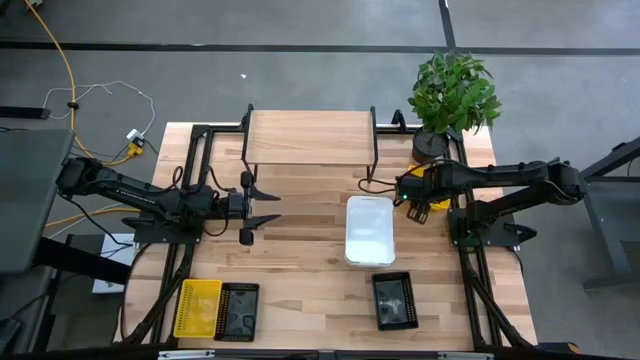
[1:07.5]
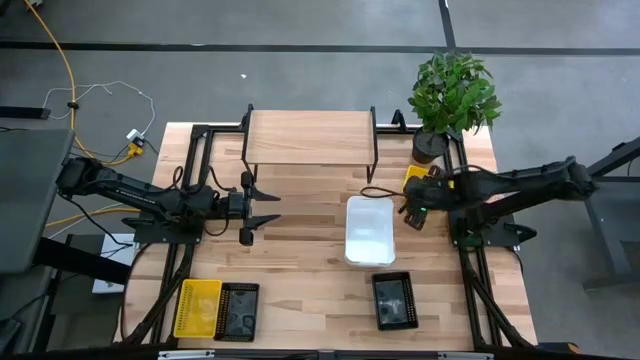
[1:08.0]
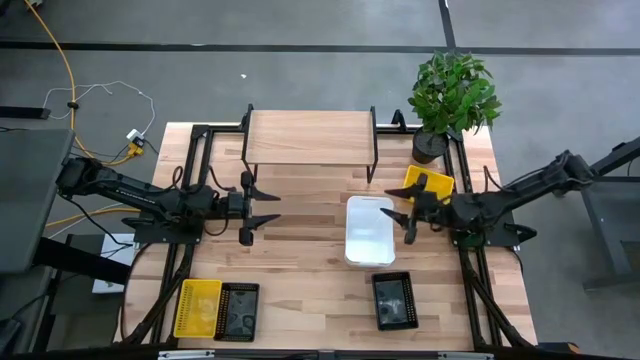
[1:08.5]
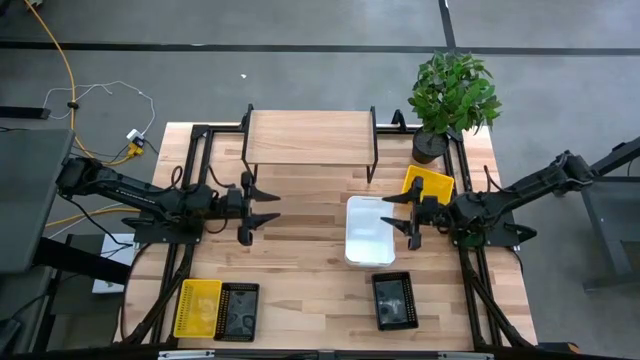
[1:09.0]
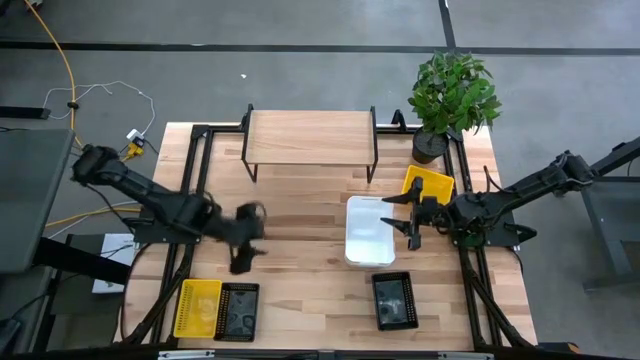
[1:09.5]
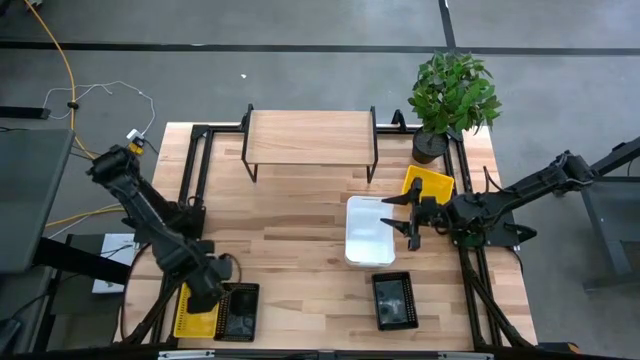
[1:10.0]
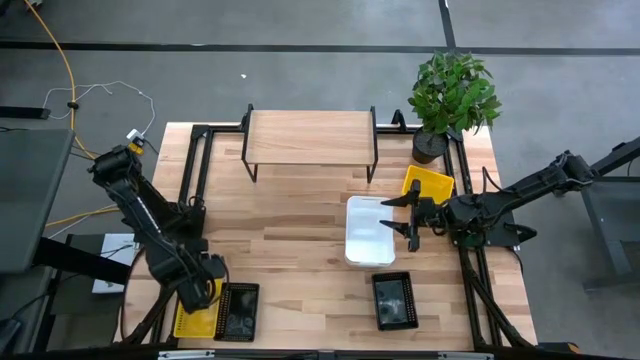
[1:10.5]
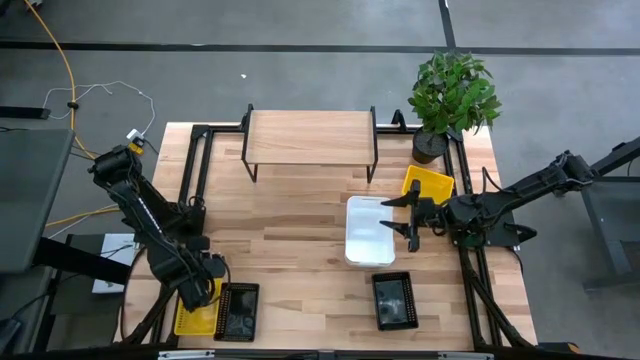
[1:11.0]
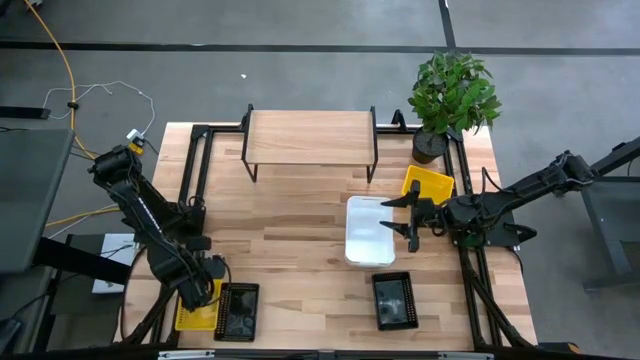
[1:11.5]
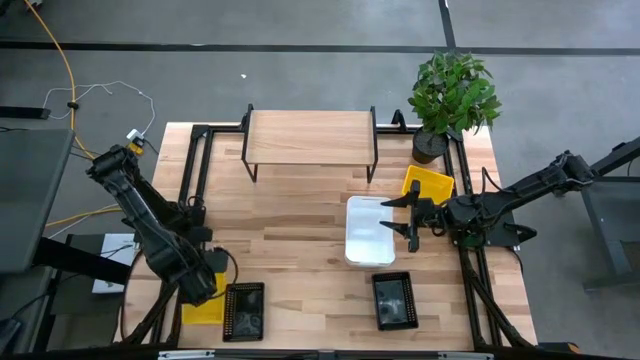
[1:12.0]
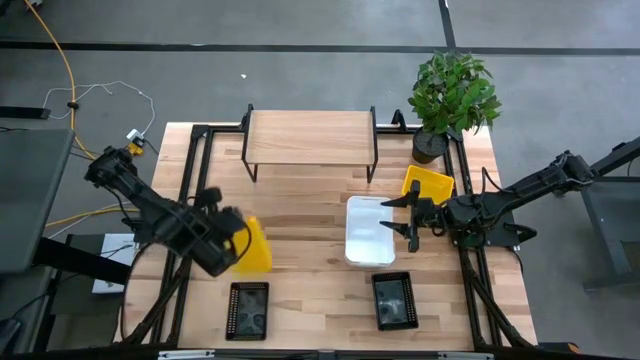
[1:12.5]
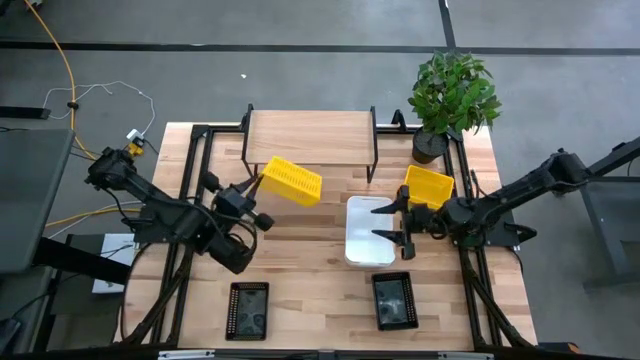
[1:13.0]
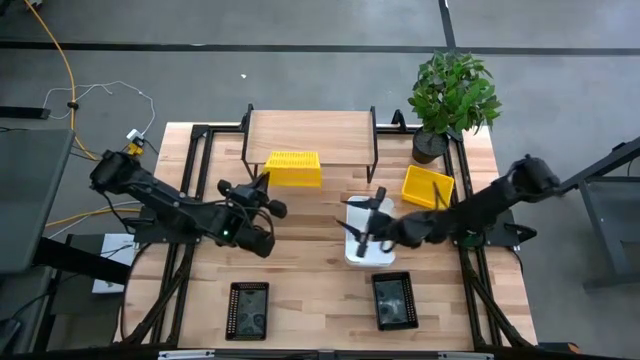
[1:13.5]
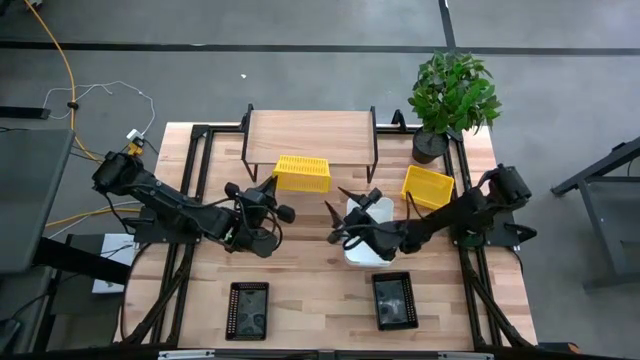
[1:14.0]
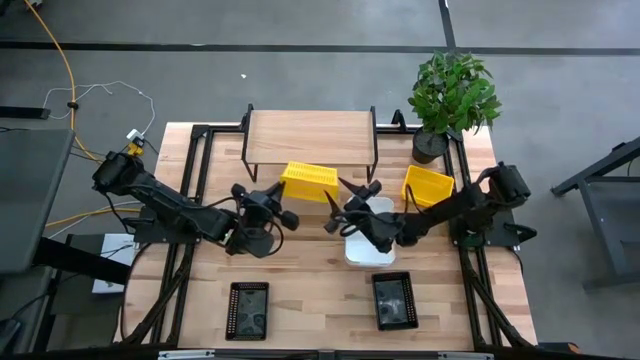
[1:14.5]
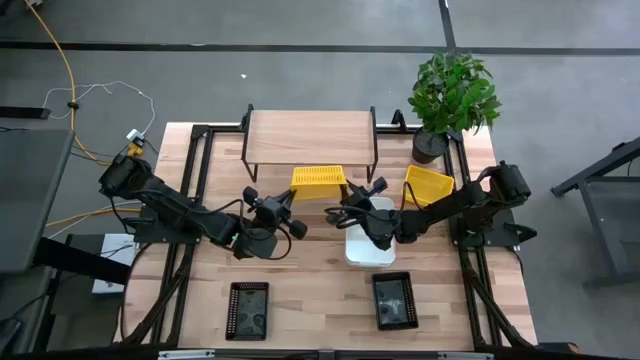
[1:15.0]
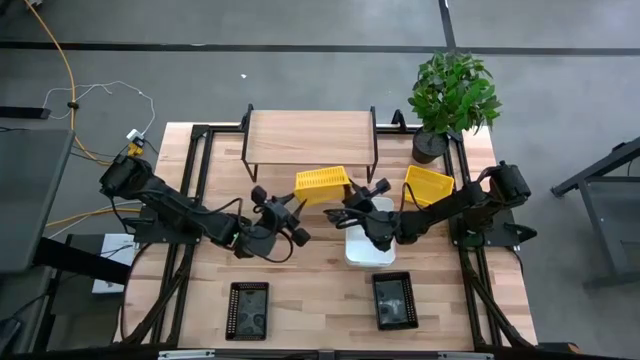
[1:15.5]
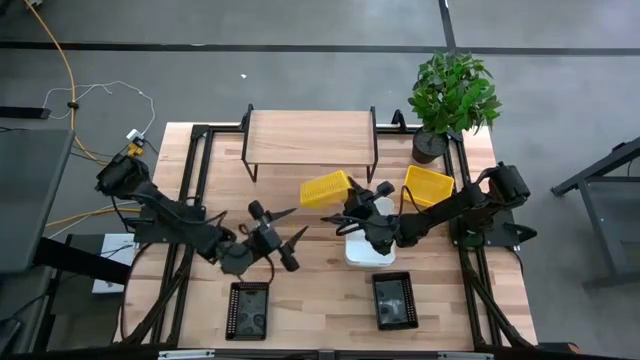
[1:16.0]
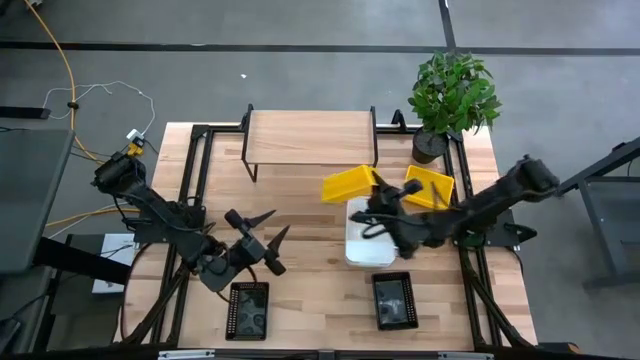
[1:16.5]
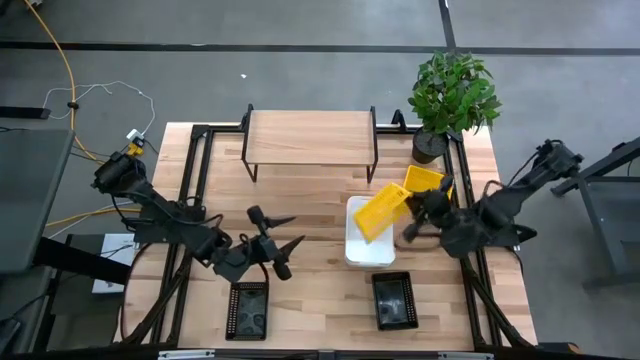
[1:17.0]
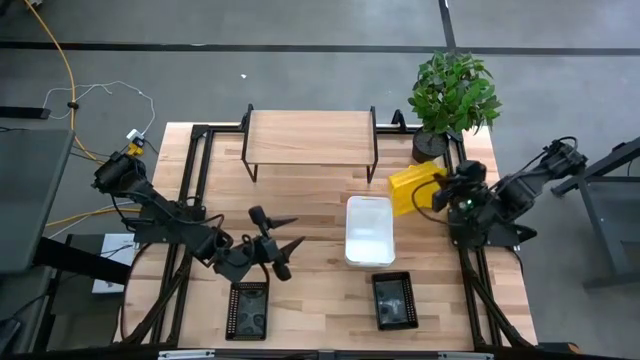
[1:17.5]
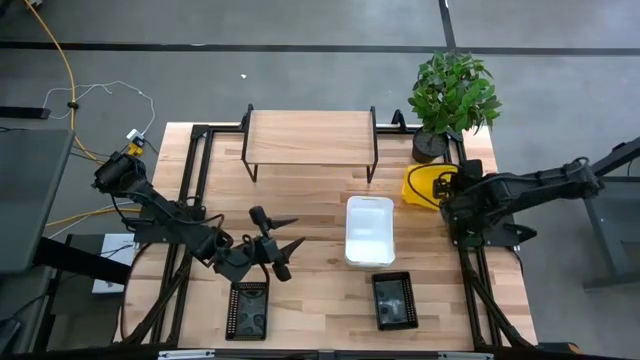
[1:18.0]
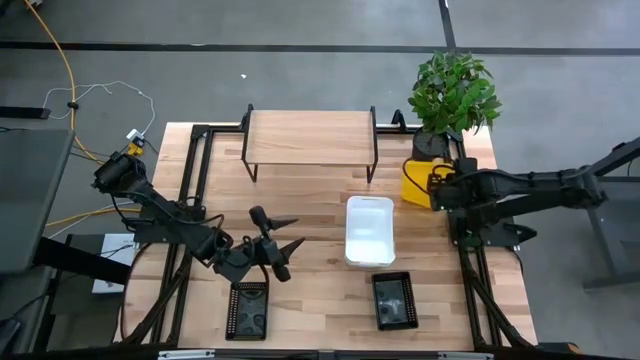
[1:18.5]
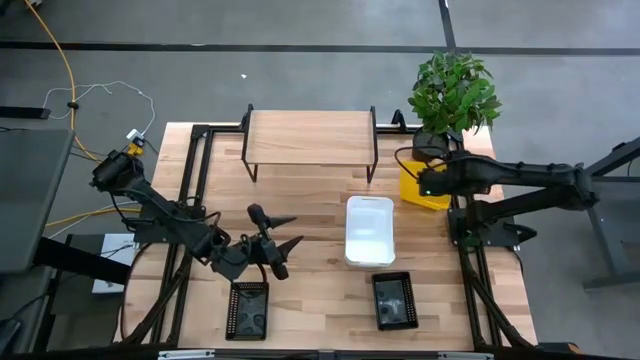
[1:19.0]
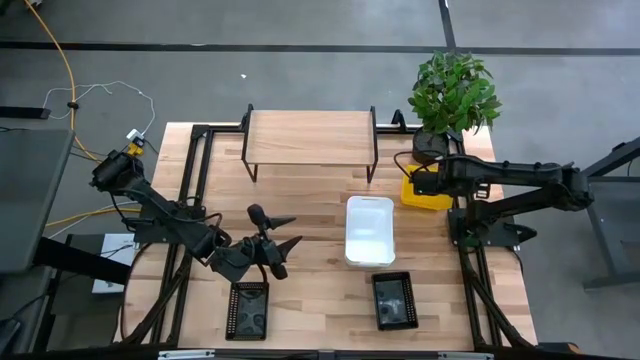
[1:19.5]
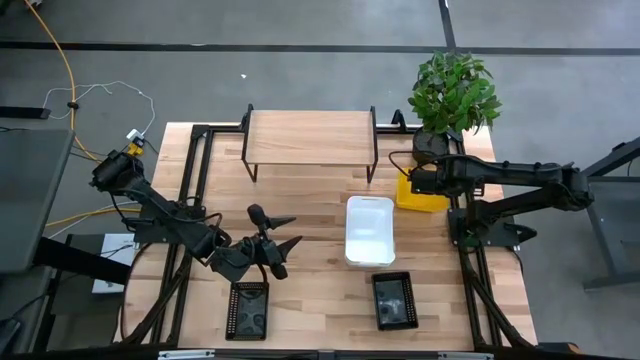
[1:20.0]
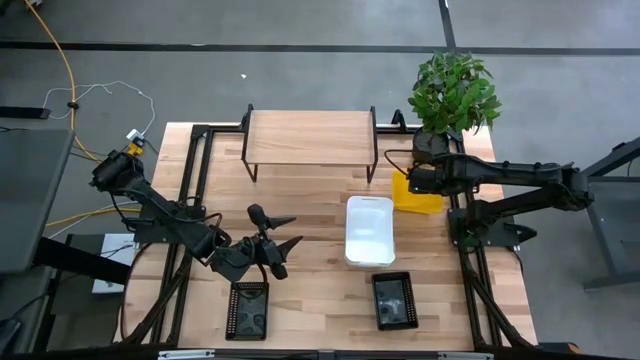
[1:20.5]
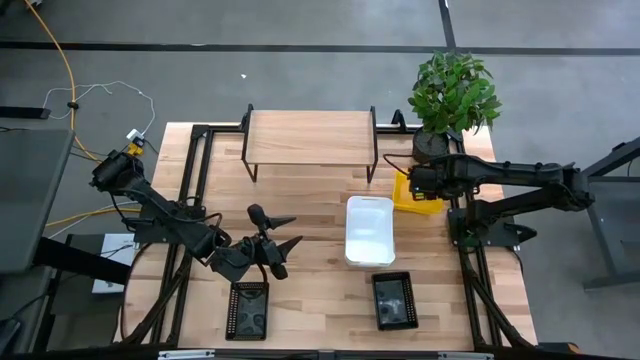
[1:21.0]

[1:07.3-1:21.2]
Task: Stack baskets on shelf by color
Stack the bottom yellow bin on the yellow bins

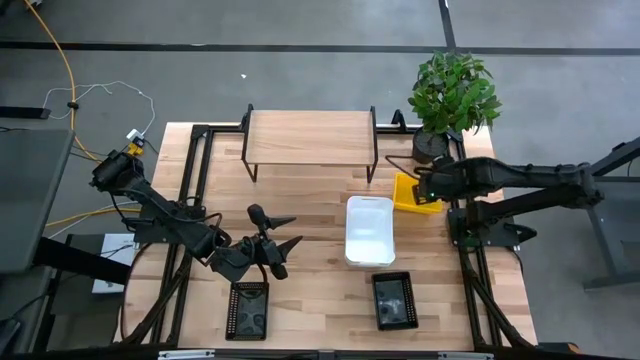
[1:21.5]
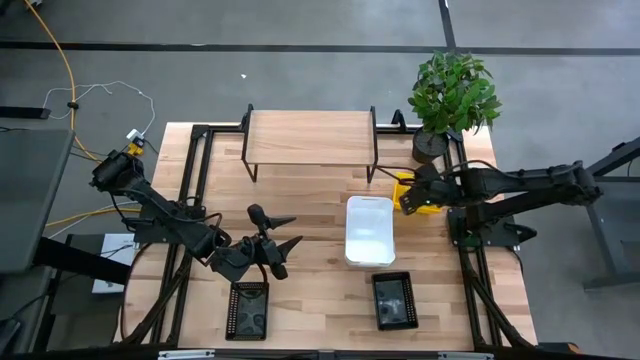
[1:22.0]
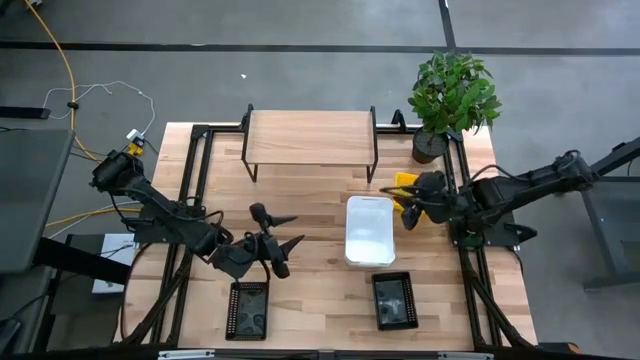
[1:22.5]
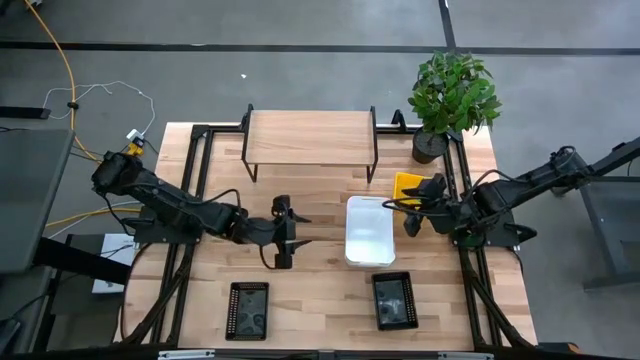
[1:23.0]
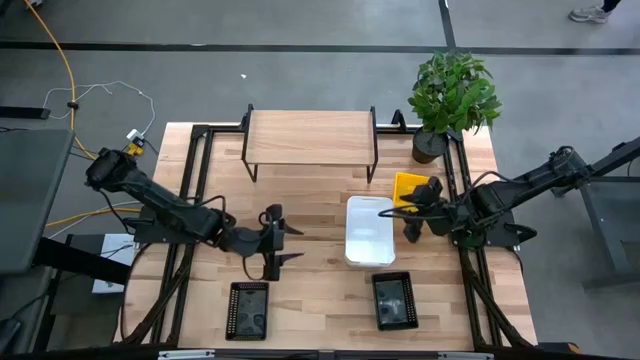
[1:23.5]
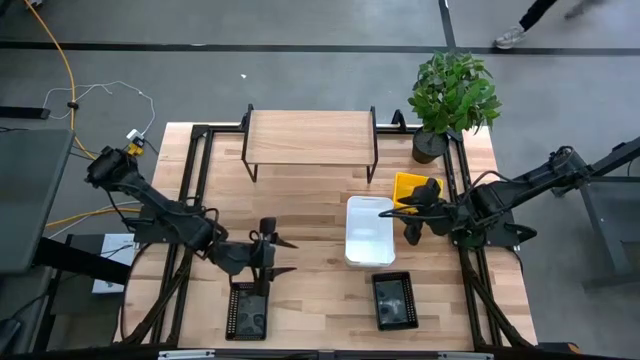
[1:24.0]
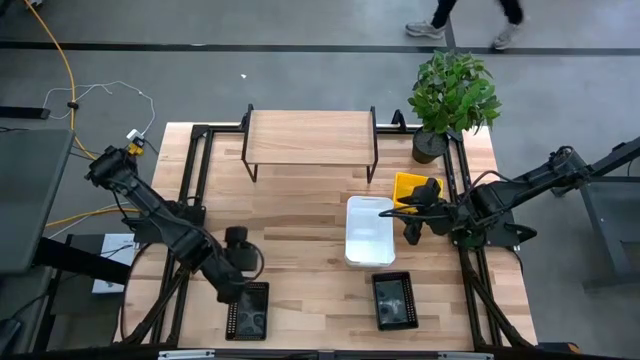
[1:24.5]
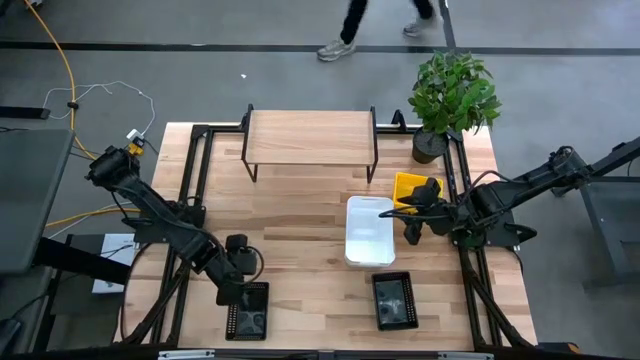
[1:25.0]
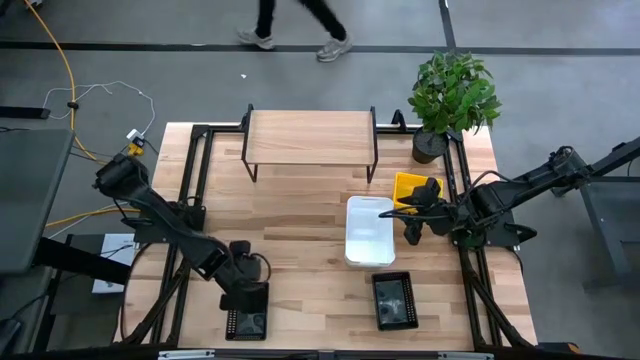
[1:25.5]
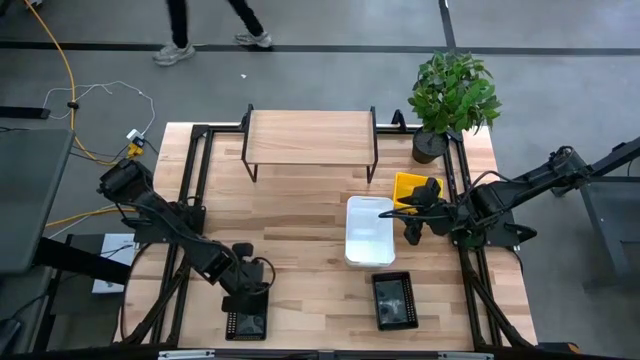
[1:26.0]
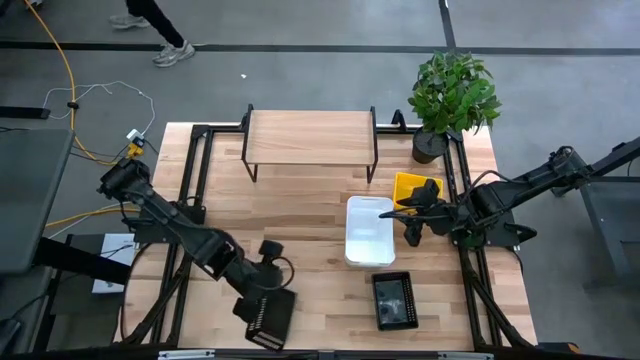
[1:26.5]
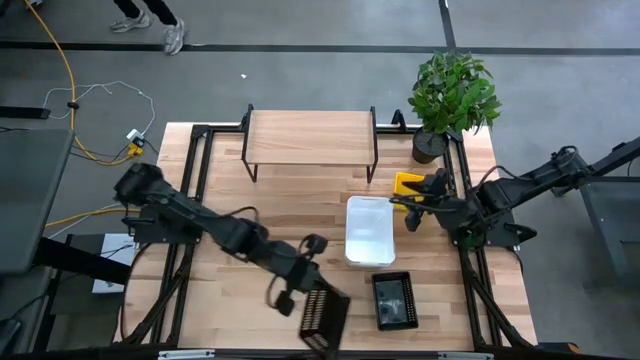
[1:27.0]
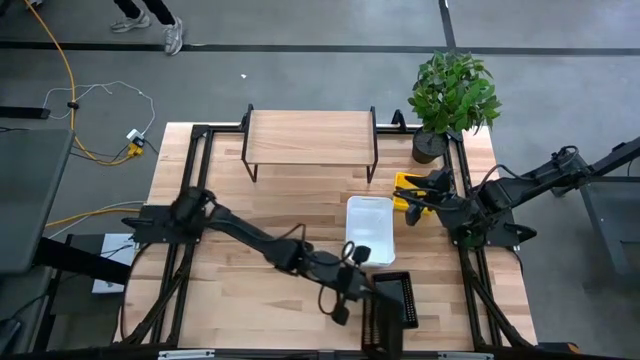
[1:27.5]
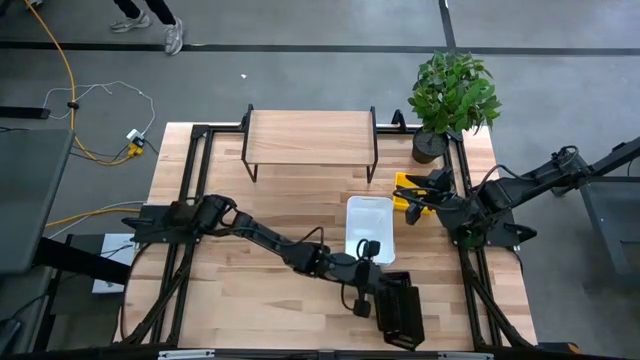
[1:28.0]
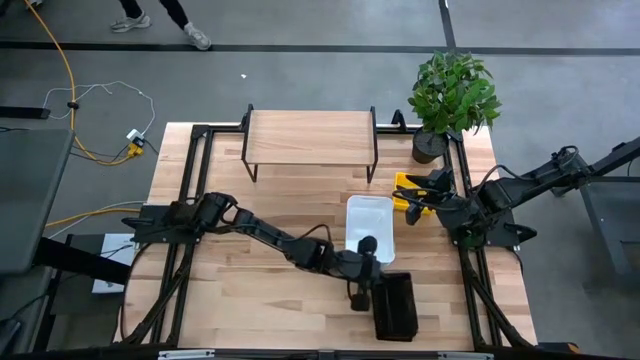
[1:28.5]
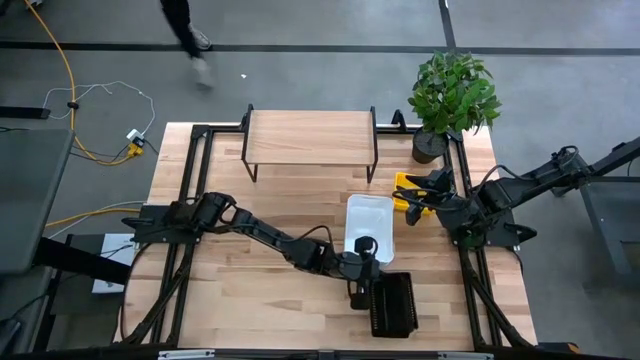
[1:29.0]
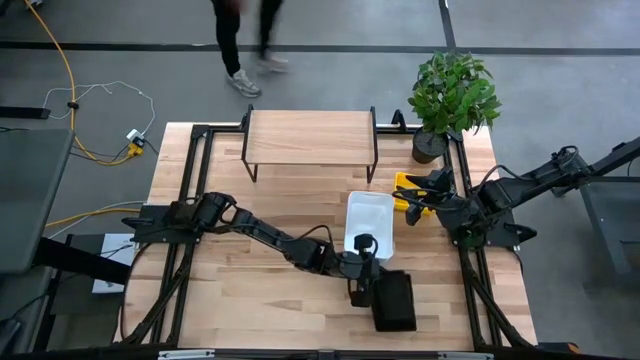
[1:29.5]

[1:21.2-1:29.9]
Stack the left black bin on the black bins
